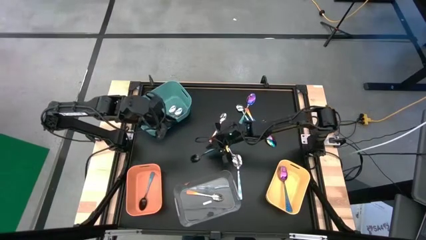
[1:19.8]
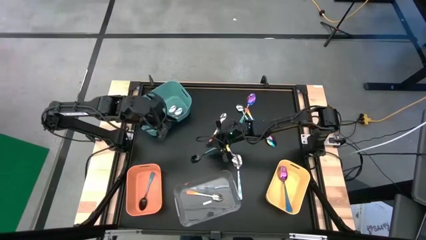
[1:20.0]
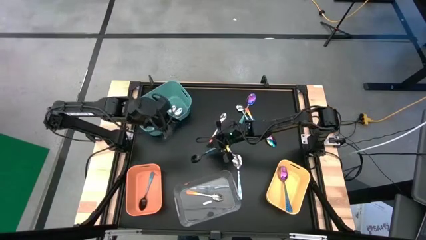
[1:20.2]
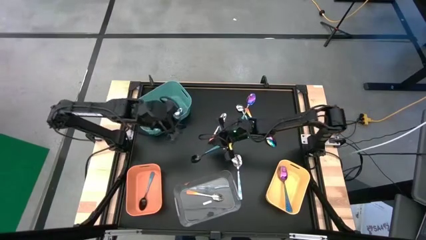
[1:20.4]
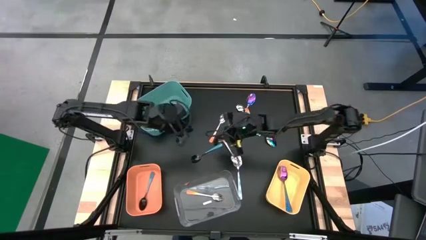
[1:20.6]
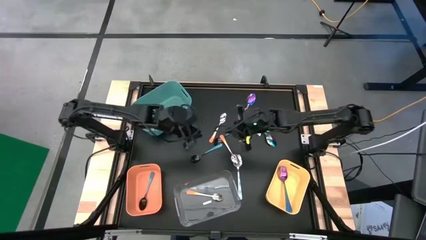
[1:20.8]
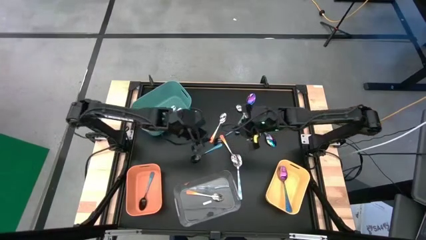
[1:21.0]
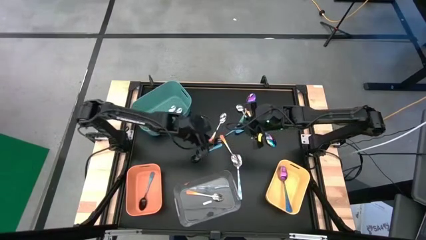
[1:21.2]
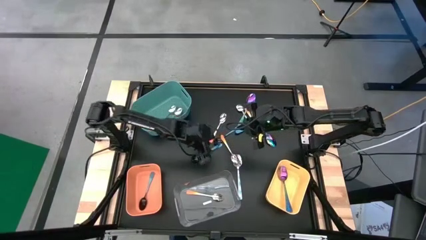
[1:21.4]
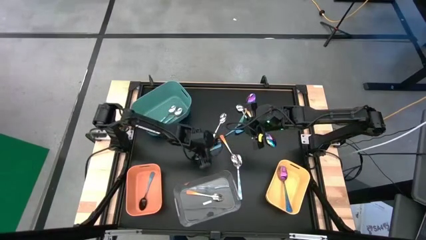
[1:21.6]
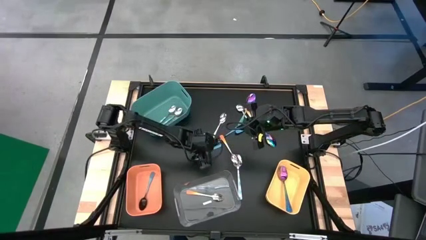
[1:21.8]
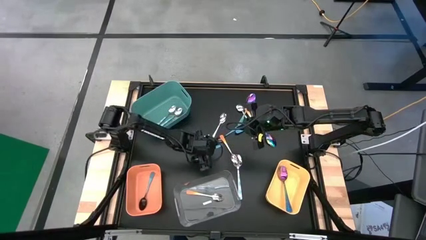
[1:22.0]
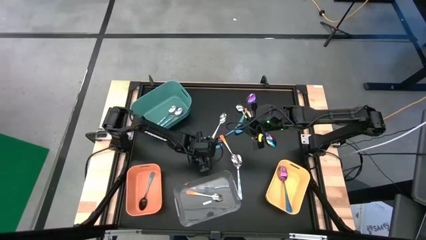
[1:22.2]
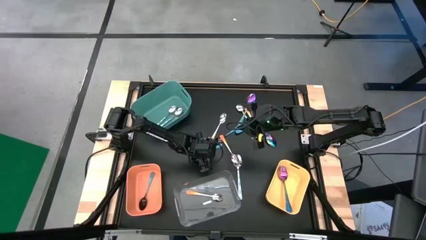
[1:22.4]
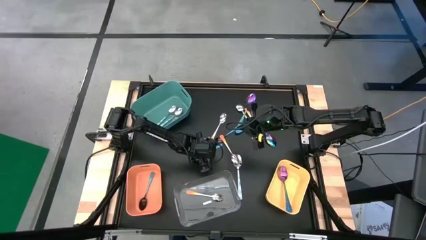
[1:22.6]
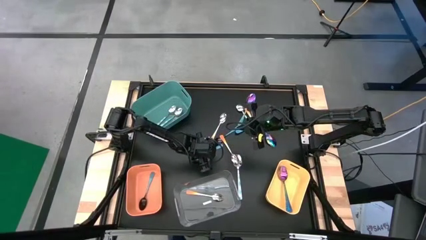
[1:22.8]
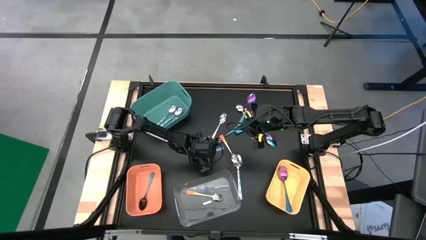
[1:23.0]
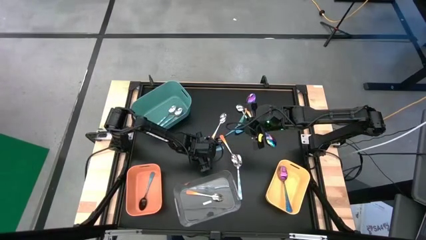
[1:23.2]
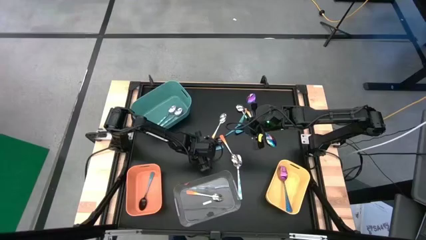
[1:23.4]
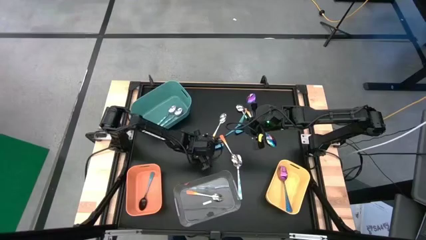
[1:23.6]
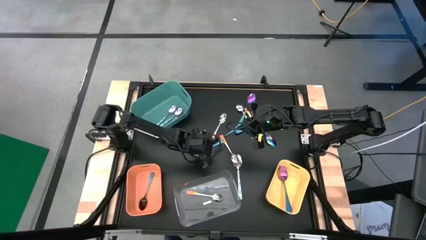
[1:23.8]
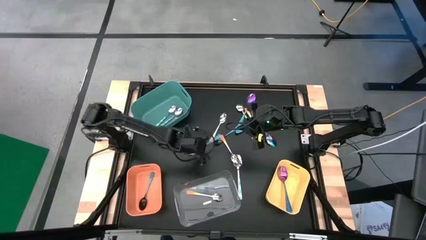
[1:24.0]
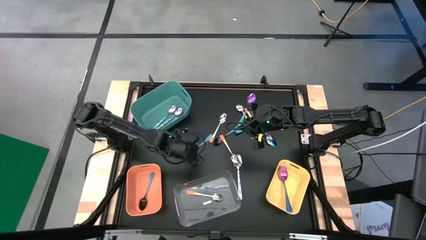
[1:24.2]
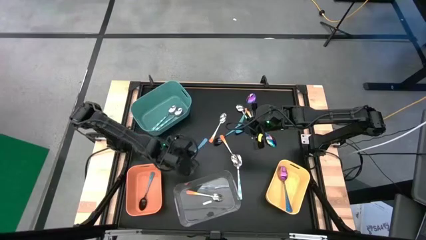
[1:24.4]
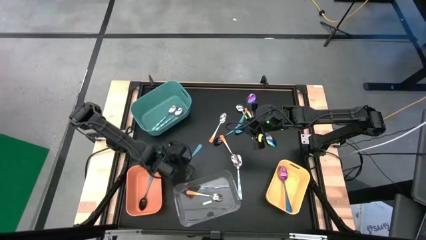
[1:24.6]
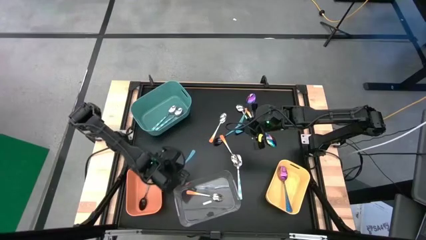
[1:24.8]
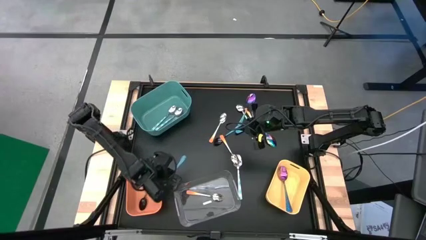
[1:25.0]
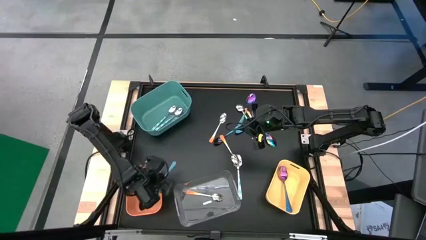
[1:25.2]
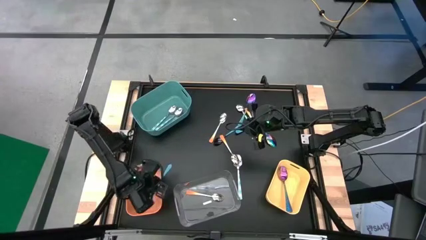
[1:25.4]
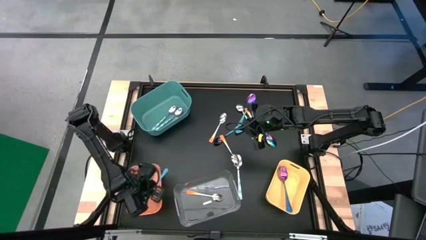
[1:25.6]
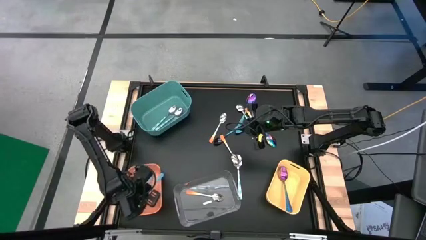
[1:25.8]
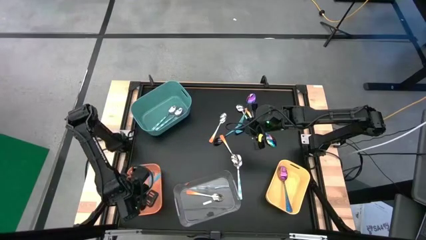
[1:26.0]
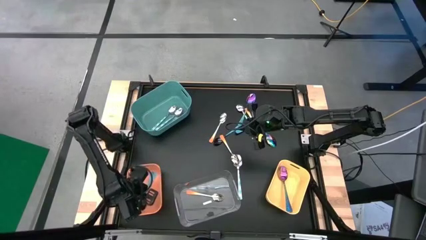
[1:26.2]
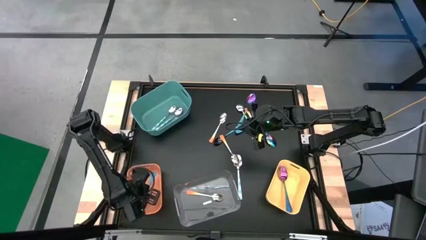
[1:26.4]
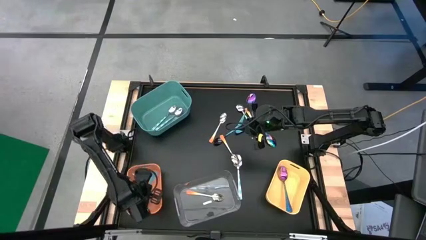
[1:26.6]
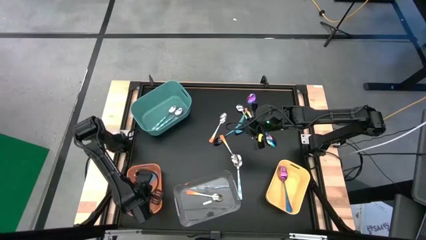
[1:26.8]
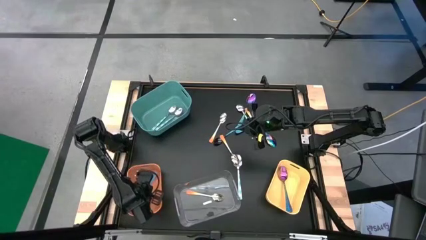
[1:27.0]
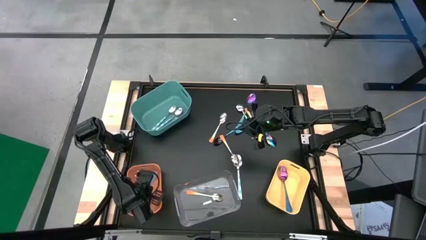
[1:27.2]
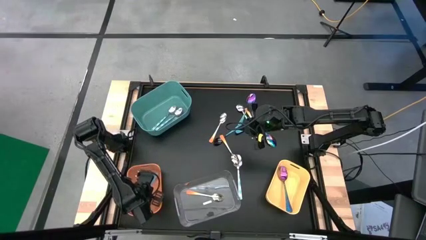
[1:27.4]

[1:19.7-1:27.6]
Task: Sort silverware by color (type)
Put the blue spoon into the orange bin

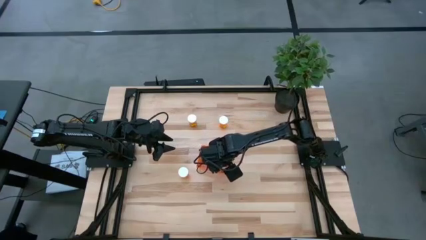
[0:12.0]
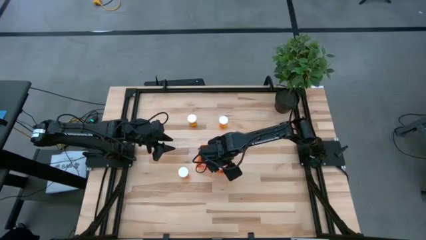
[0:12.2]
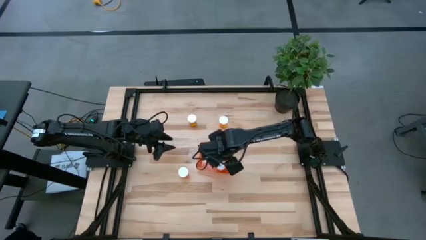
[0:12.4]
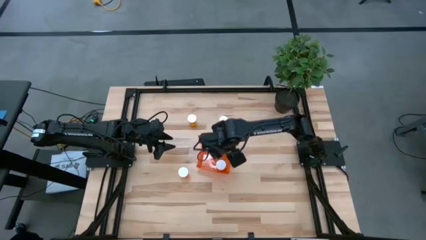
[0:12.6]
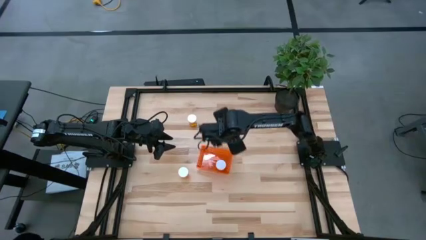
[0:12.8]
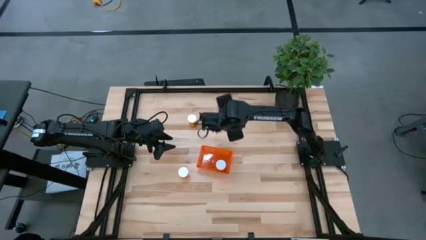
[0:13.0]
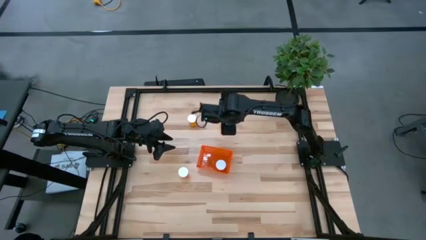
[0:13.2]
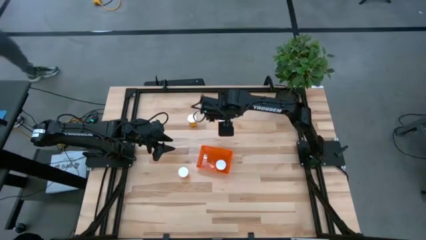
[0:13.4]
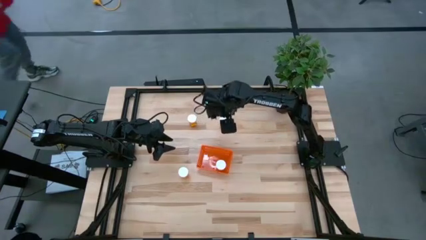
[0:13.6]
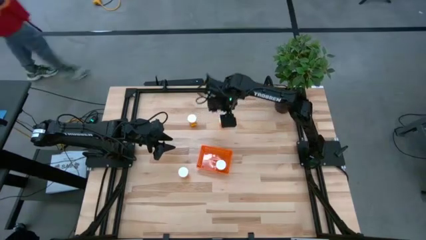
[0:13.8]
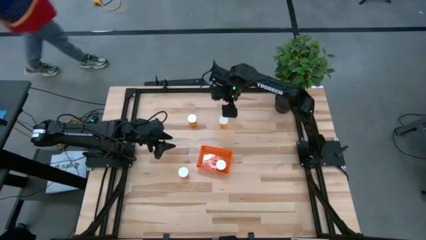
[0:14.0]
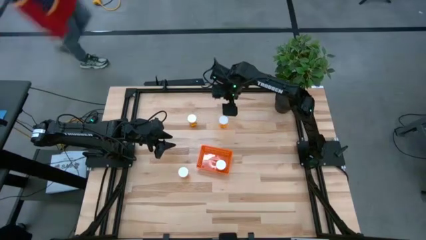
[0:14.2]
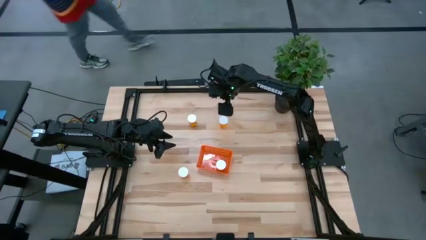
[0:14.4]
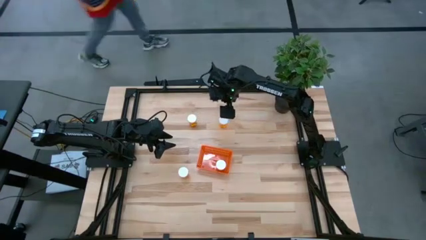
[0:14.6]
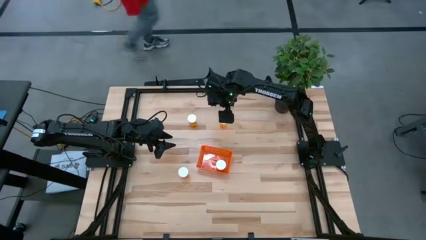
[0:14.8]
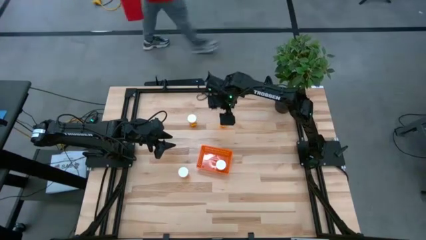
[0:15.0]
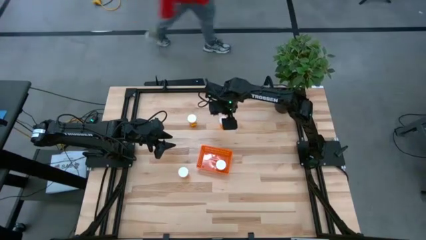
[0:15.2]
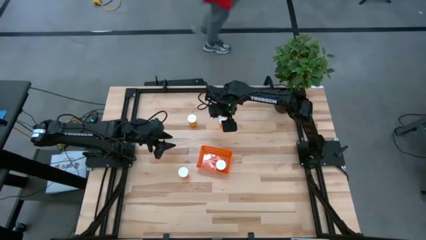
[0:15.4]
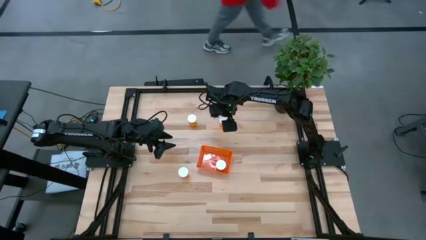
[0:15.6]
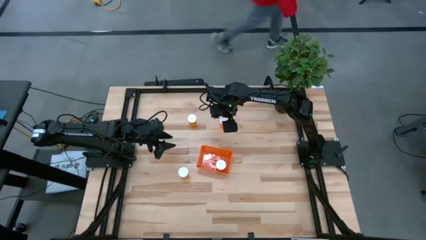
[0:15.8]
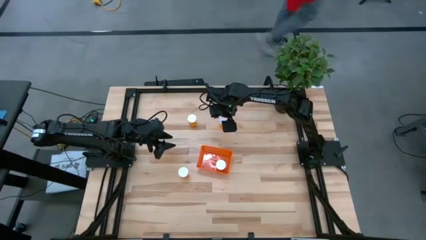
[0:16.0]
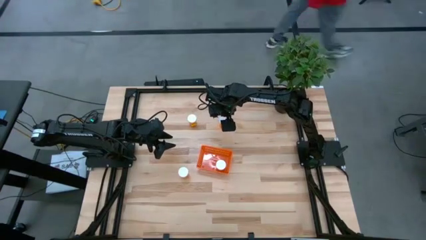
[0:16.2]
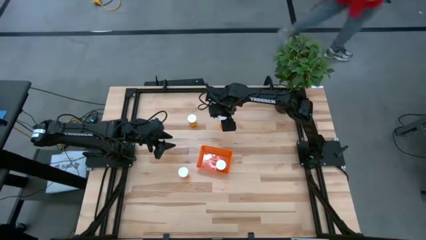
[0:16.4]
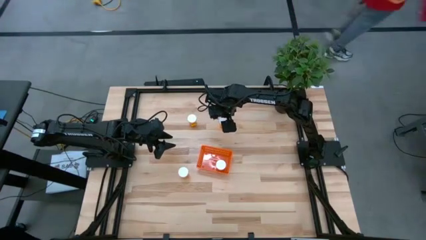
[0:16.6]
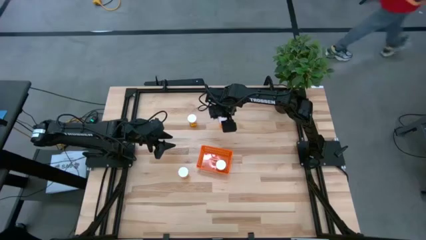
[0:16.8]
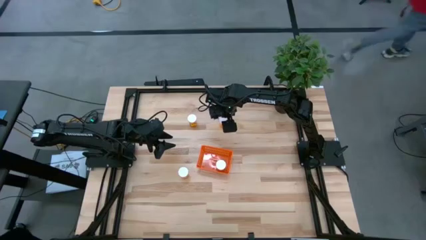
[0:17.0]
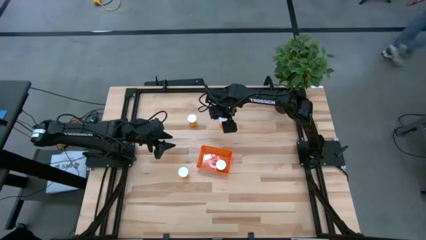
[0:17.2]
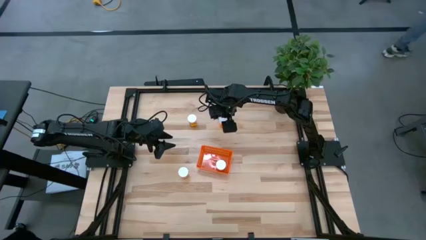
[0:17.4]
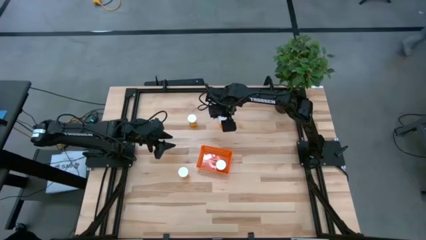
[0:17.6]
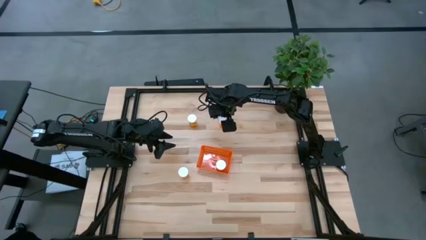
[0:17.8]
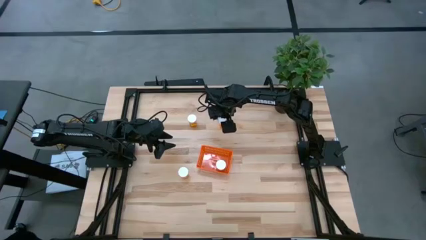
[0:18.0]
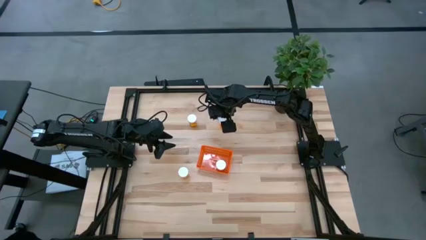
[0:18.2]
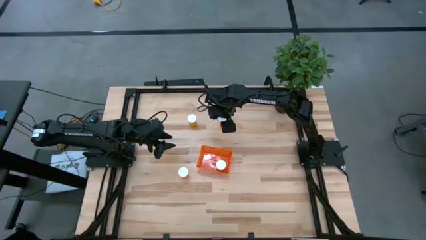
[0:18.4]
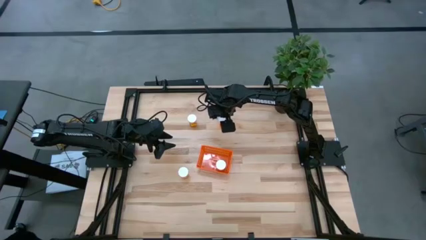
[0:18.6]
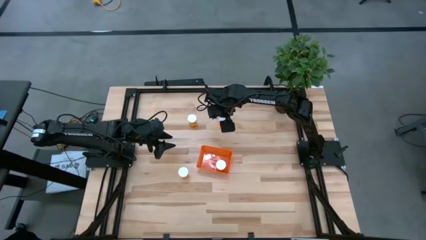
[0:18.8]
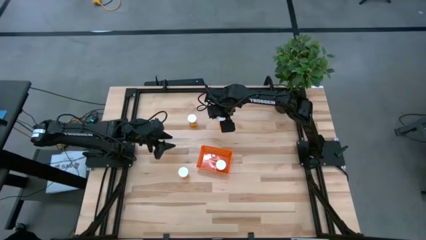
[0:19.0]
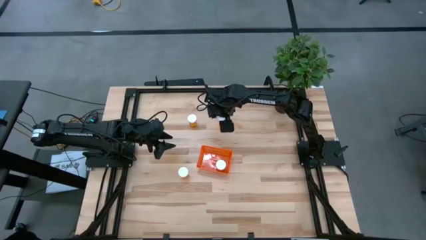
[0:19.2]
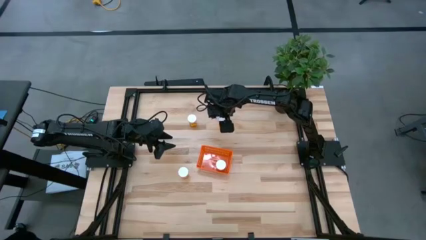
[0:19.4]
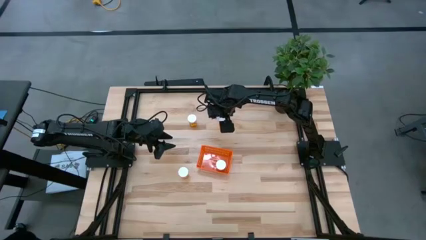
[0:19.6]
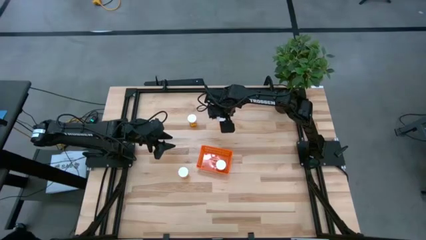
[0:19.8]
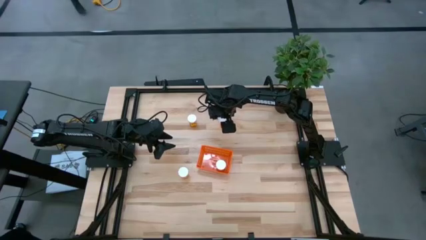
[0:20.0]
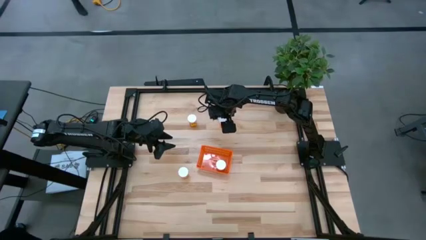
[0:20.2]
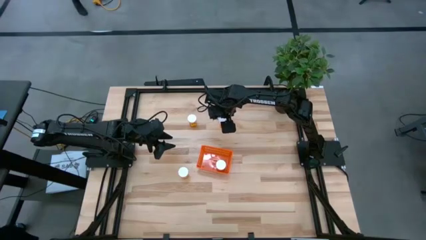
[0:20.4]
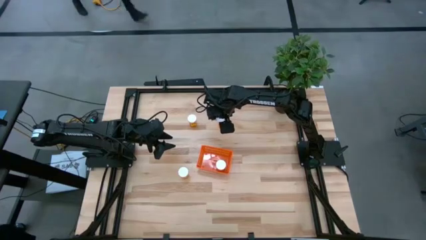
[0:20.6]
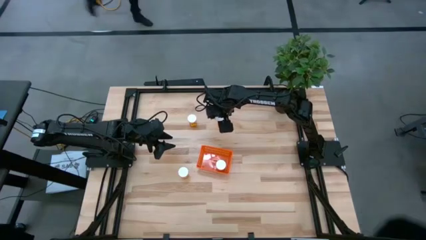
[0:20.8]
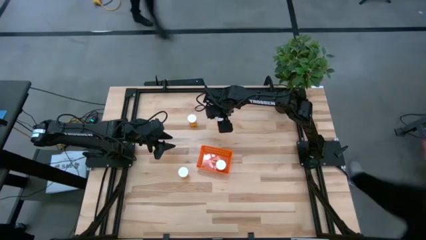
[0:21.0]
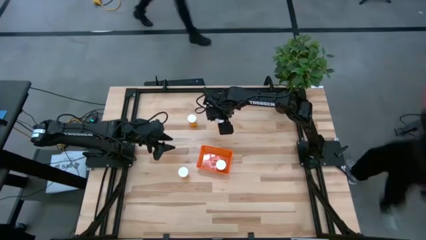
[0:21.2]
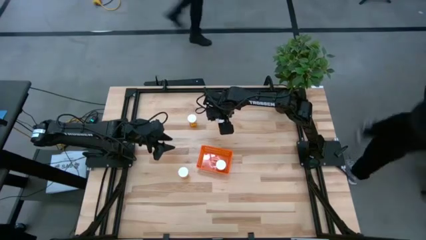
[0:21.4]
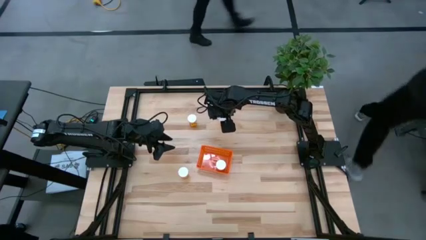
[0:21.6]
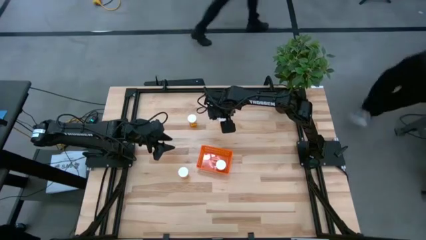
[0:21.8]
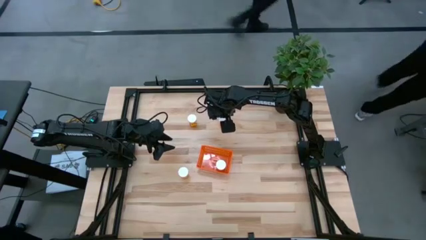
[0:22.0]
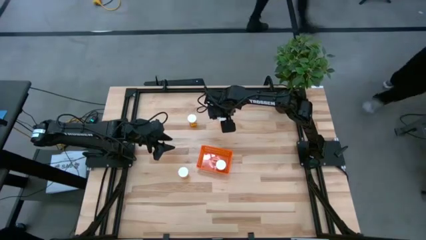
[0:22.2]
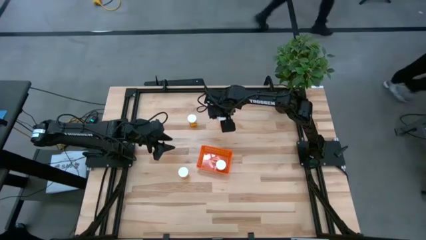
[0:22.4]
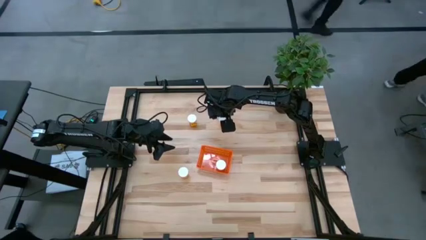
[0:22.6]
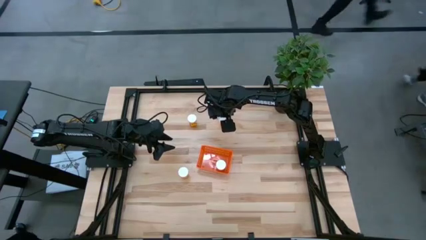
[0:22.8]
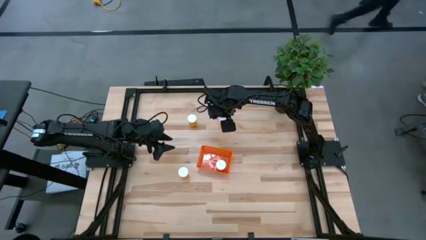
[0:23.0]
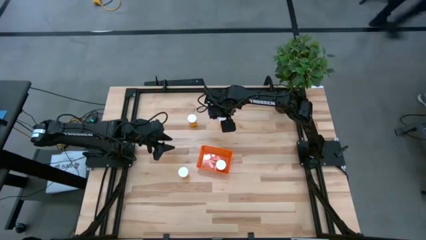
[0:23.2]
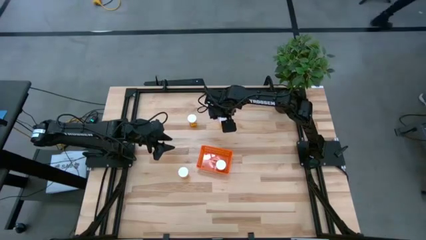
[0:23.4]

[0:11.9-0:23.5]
Task: Pick and place pill bottles into a basket
Put the top right orange pill bottle into the orange bin
